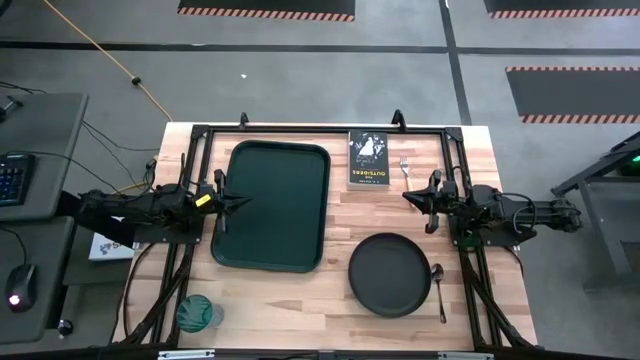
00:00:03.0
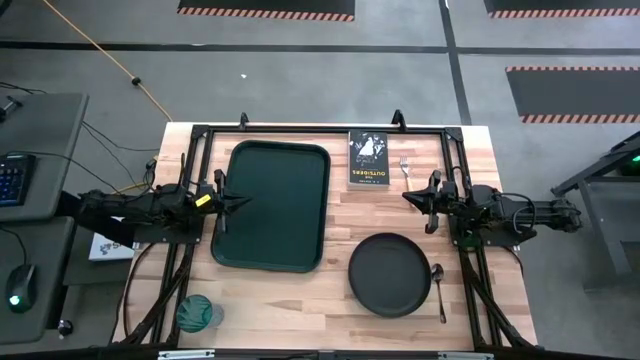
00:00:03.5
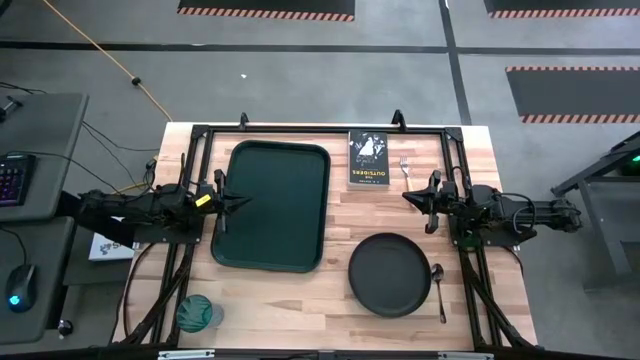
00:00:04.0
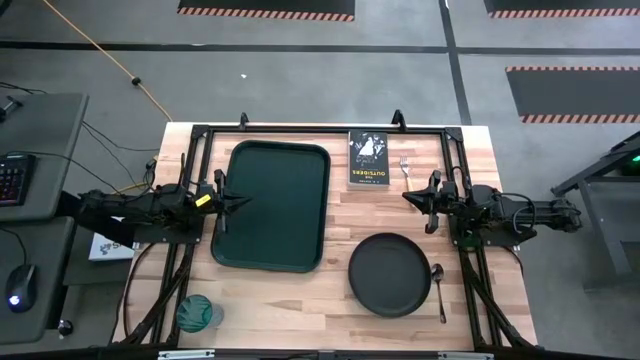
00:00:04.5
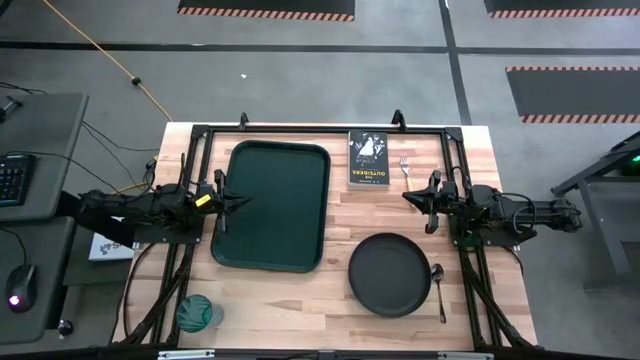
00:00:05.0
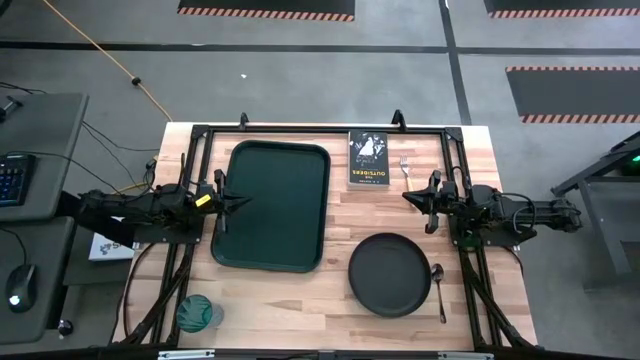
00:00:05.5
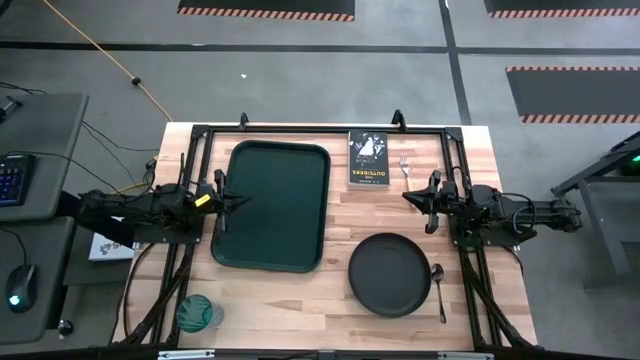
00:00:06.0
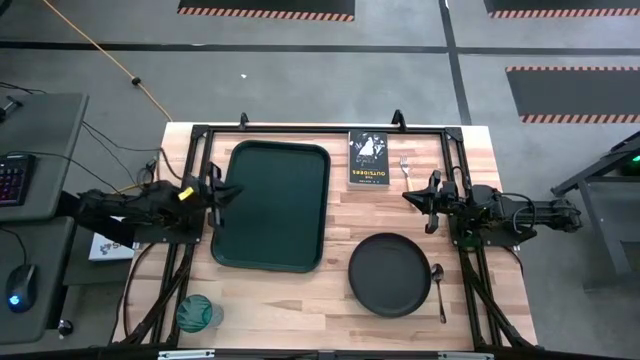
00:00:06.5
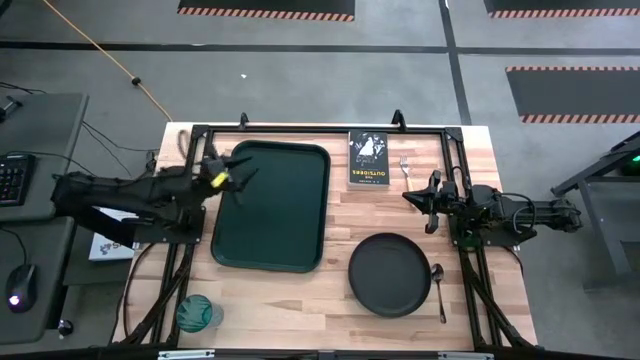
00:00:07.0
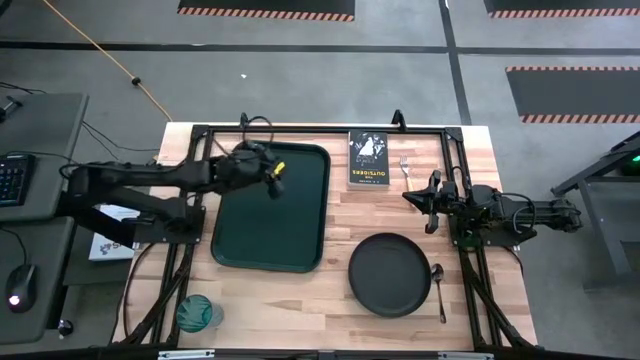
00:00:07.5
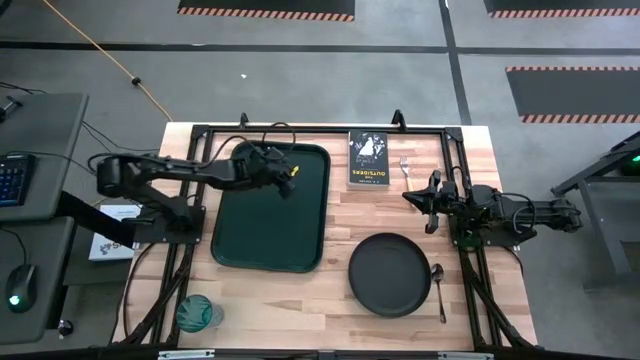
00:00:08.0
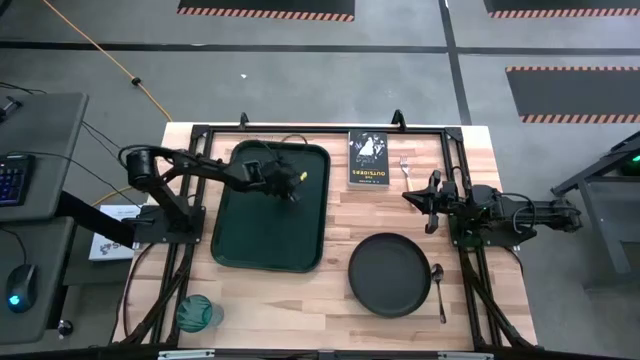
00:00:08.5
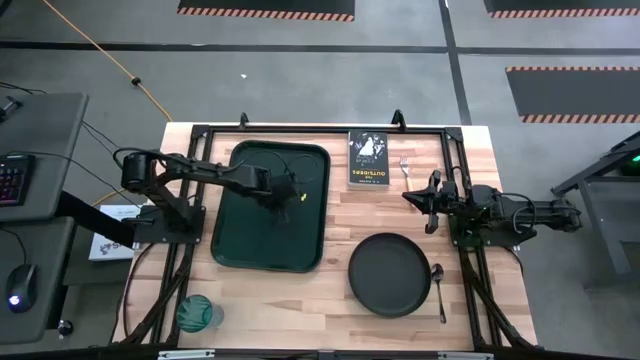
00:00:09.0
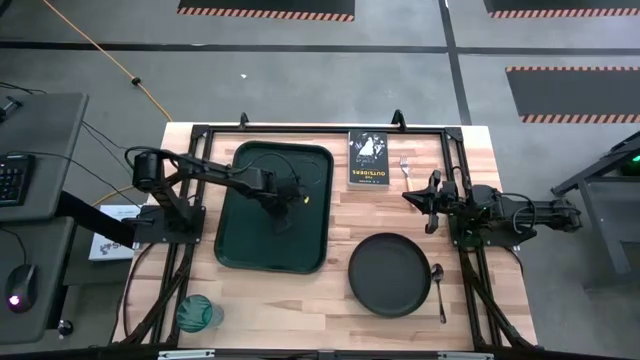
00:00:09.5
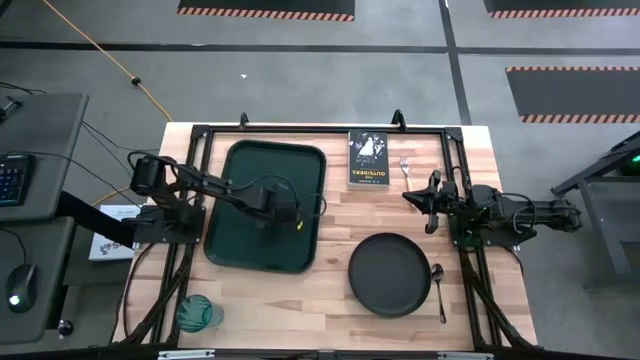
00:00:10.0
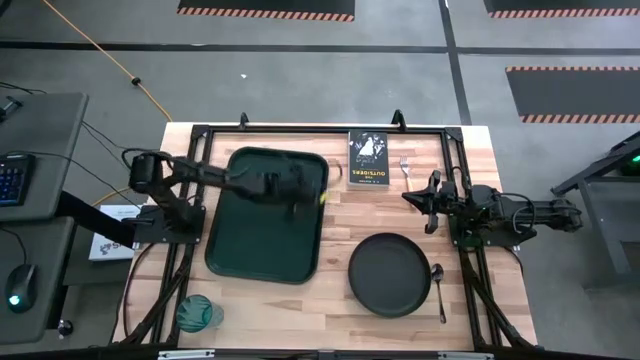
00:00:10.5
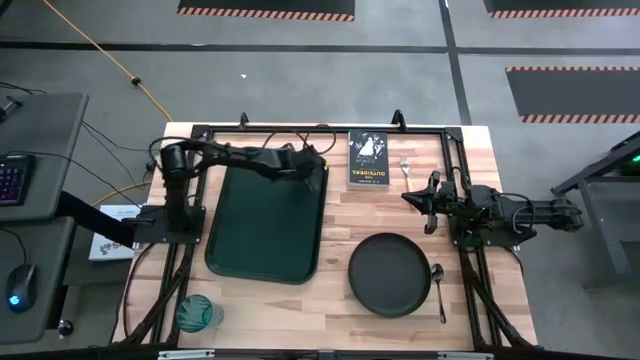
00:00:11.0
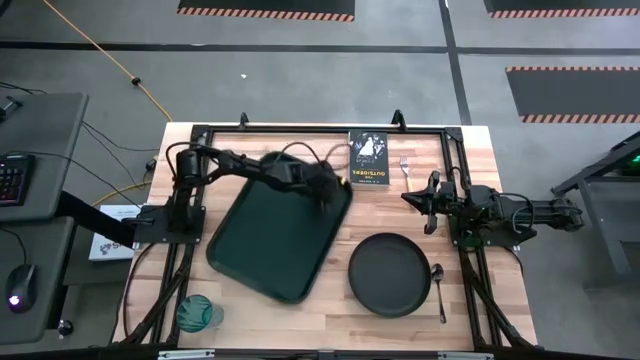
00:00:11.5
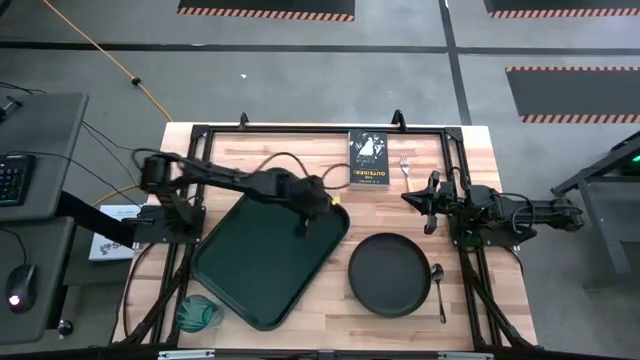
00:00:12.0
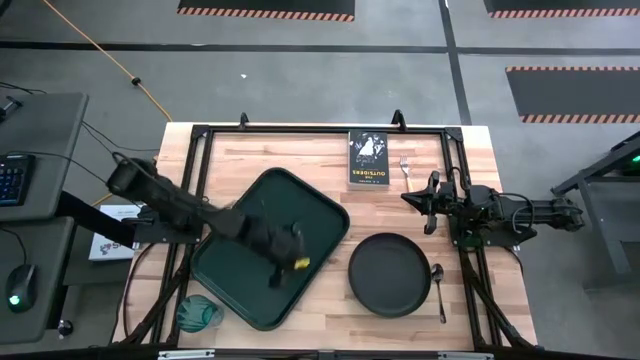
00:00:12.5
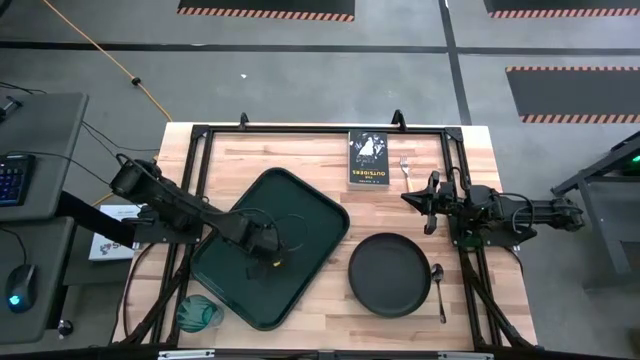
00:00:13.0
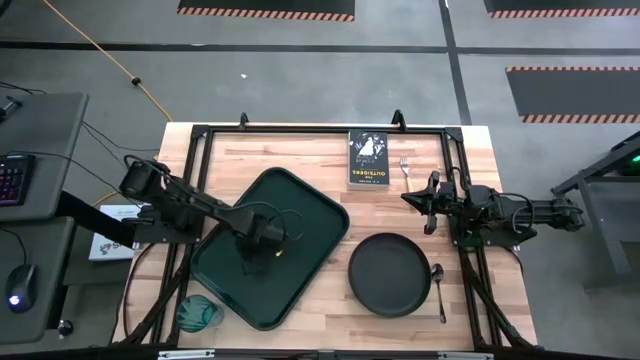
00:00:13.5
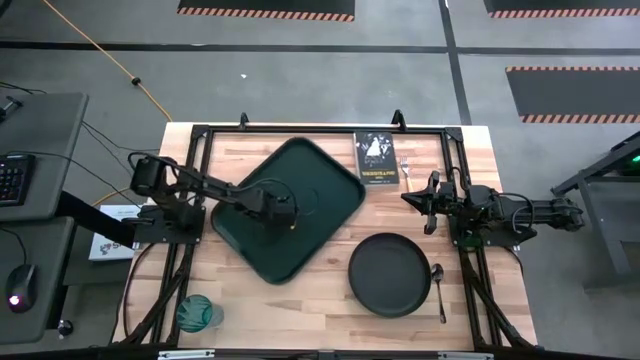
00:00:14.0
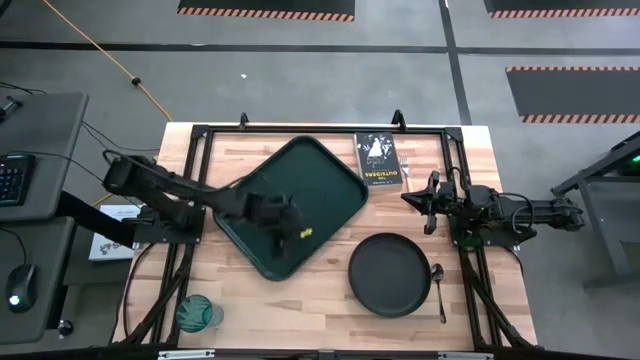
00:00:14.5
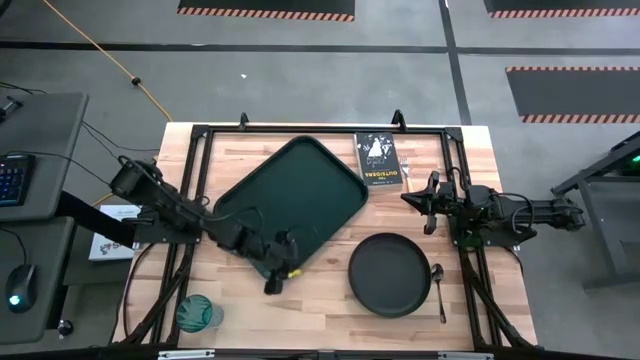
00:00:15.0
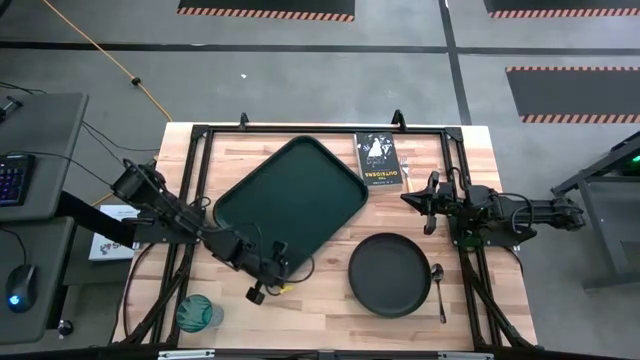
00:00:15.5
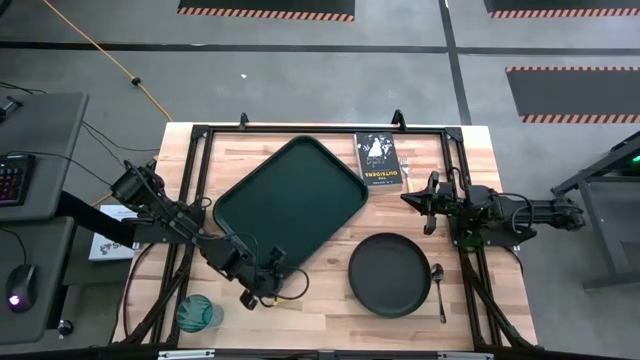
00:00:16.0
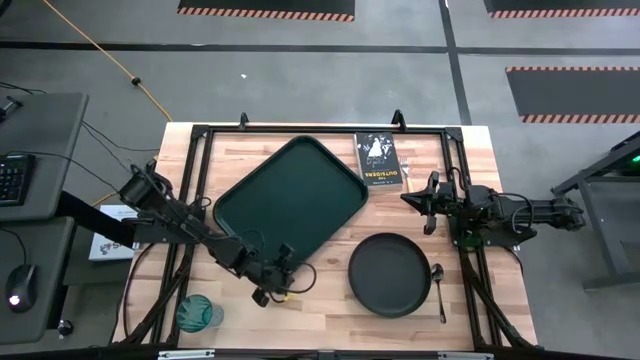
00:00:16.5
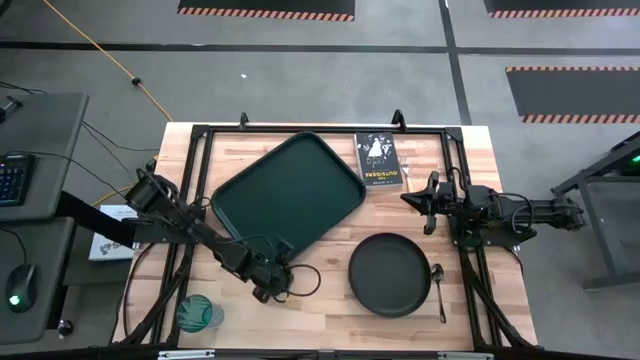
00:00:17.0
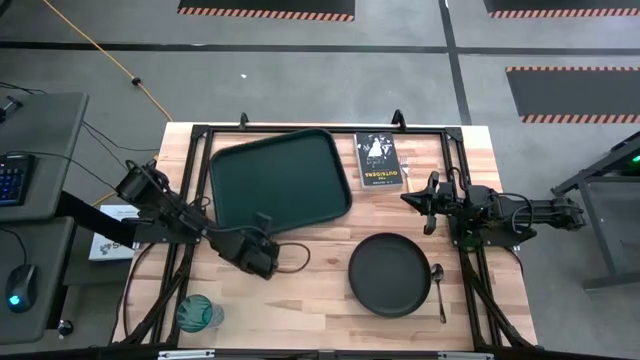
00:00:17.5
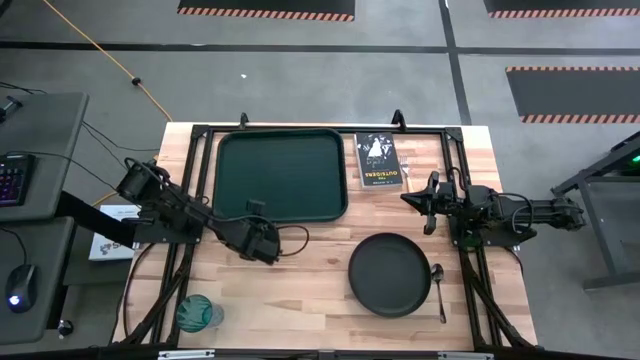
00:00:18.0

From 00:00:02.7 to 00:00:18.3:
Task: Pick and place plate/cup/fork/spoon on tray
Move the dark green tray to the top left of the table

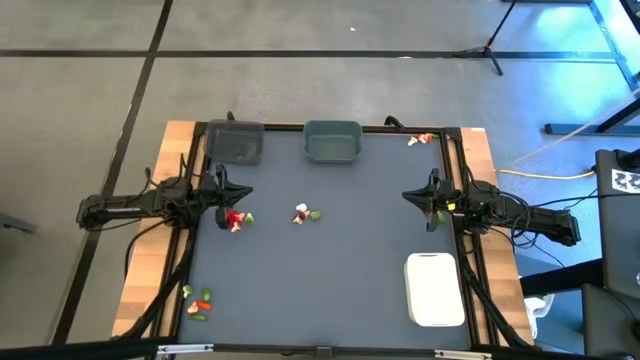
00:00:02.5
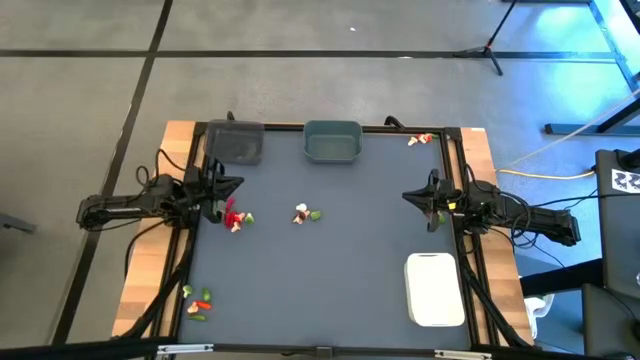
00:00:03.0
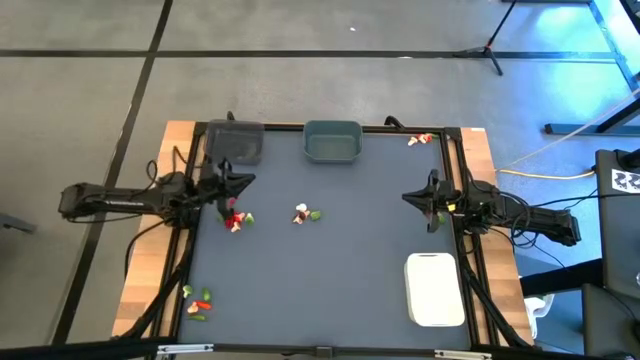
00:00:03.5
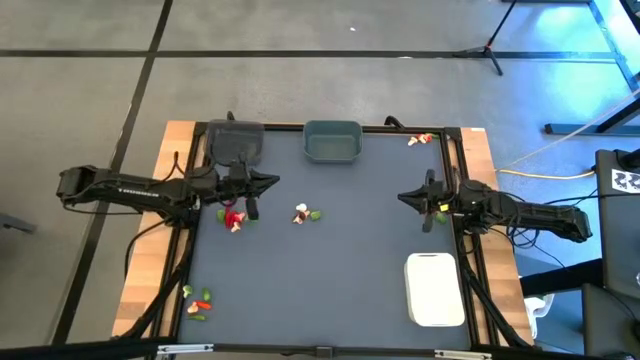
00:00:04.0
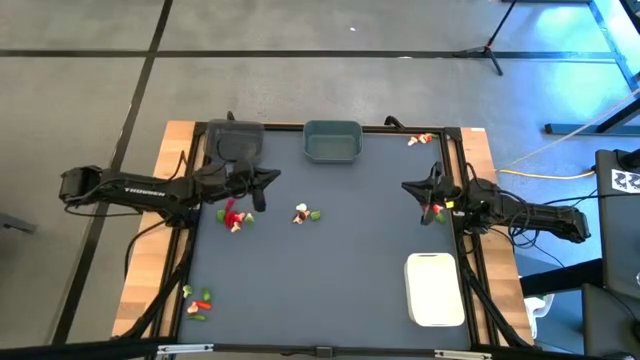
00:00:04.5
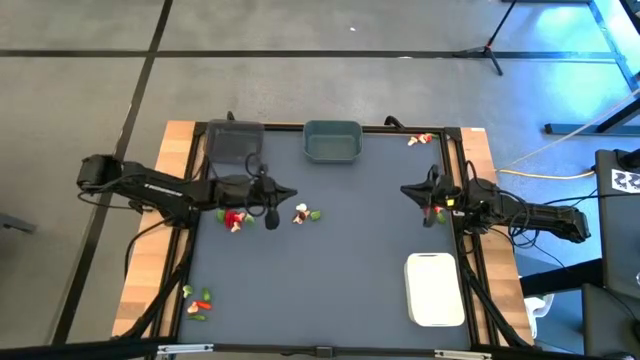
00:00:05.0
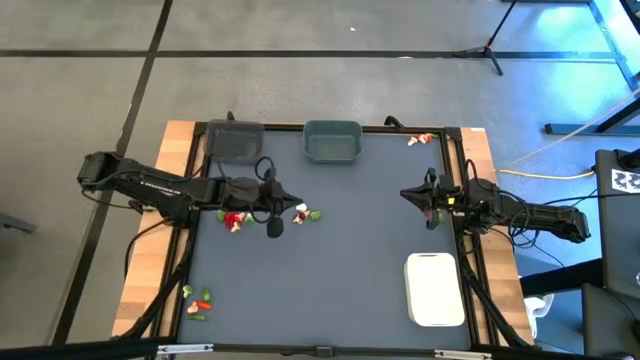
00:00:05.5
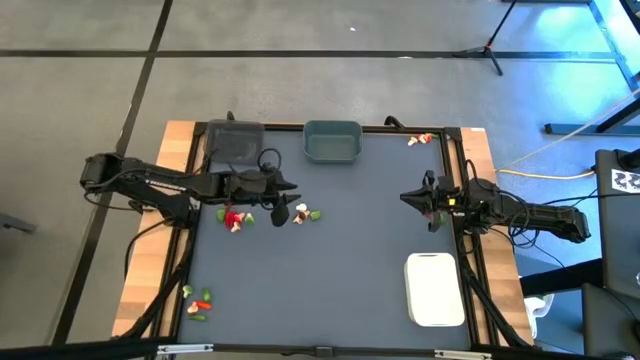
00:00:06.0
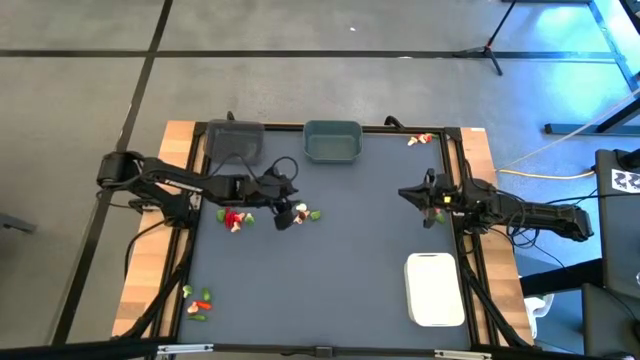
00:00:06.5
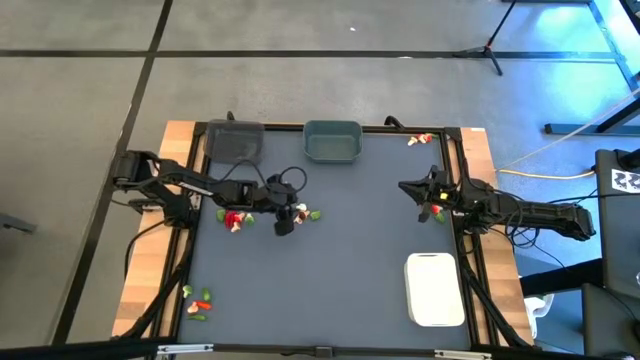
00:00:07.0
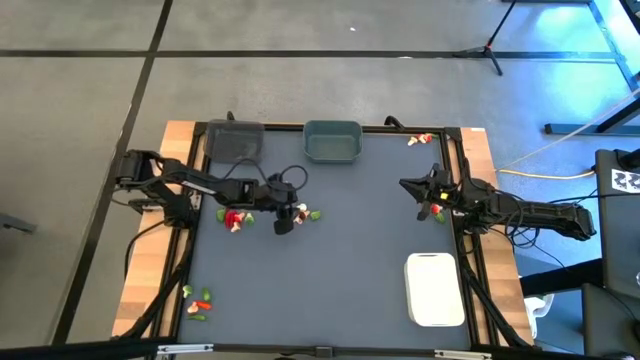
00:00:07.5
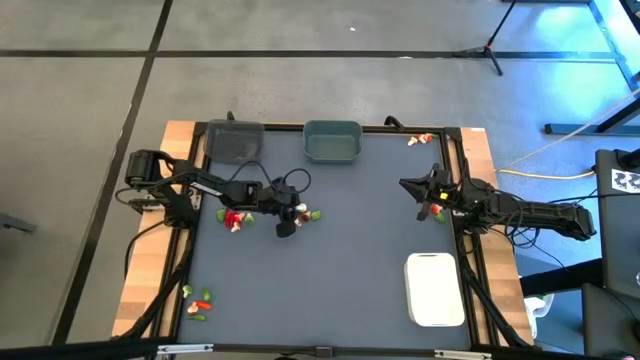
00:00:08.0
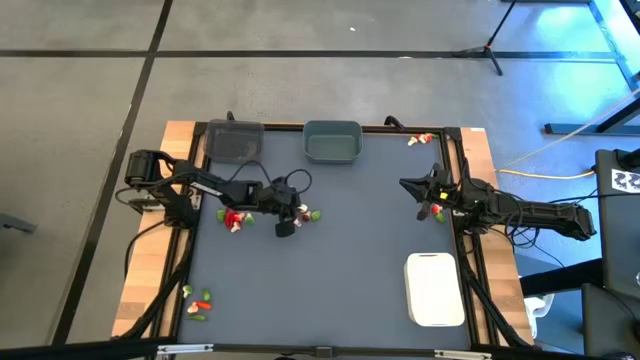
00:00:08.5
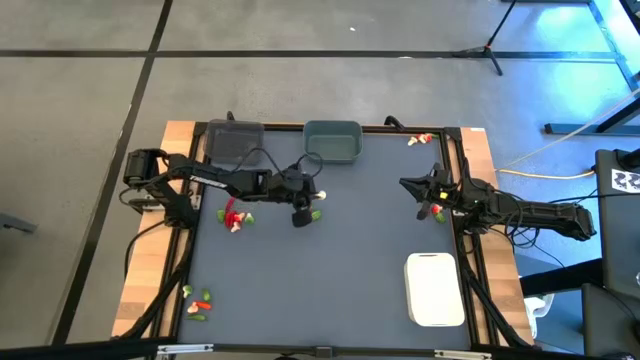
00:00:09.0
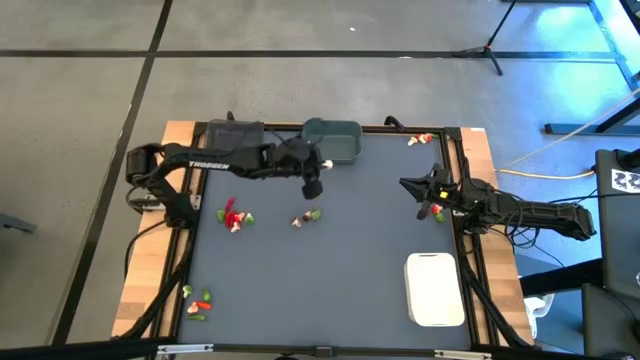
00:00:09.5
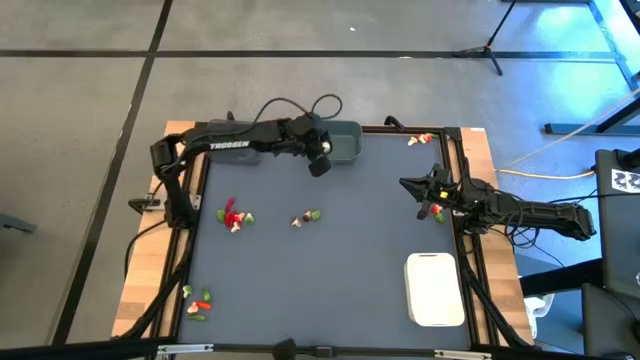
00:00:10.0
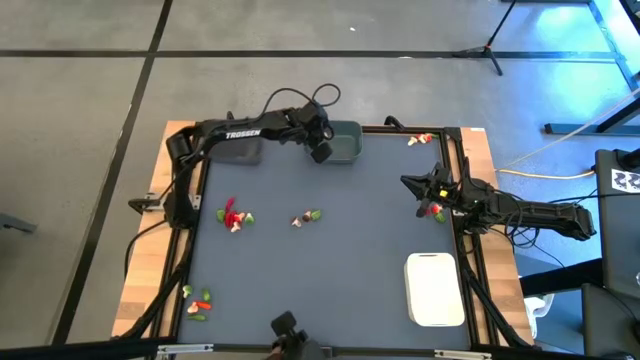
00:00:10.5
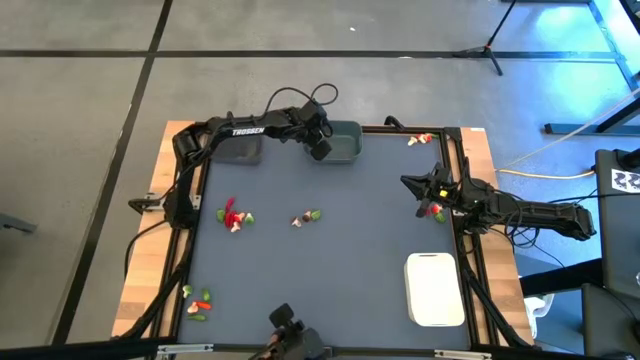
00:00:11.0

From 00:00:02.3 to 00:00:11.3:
Task: Sort produce into baskets
Put the brown mushroom into the blue bin
